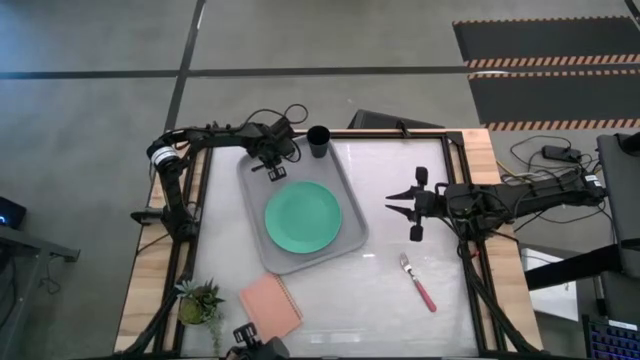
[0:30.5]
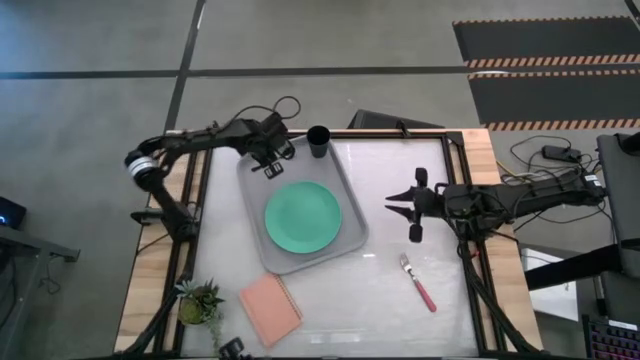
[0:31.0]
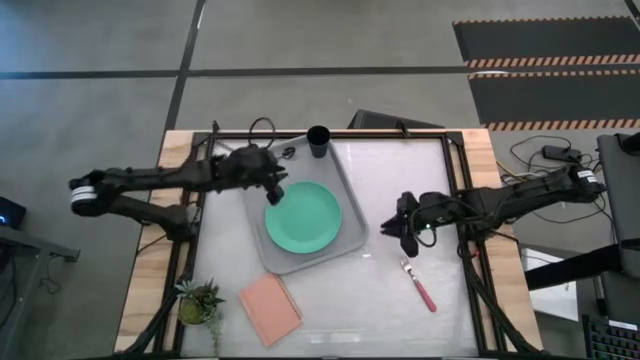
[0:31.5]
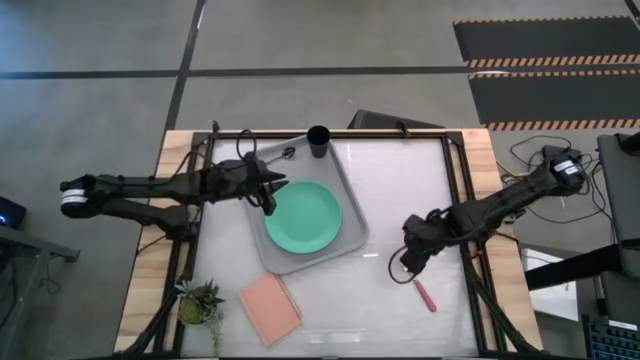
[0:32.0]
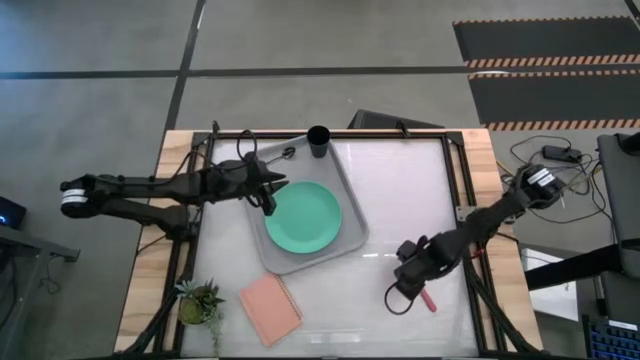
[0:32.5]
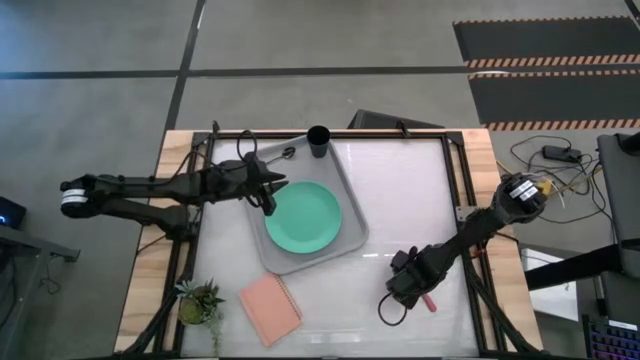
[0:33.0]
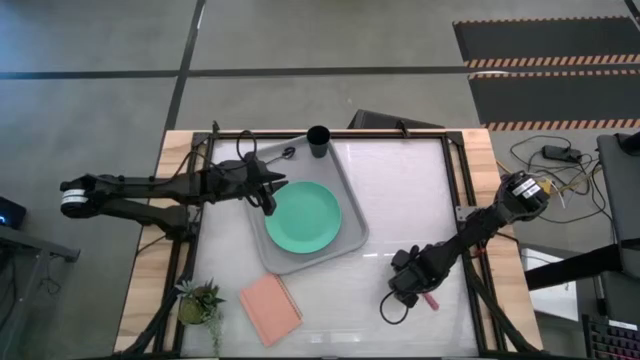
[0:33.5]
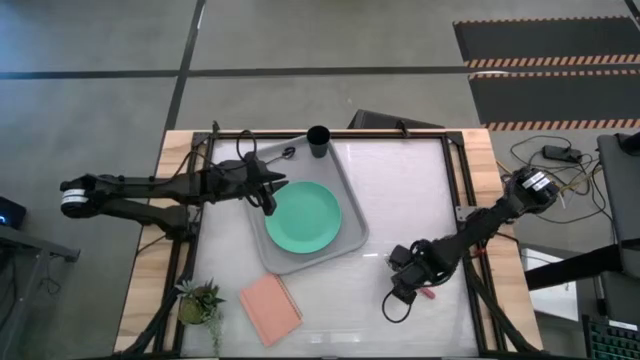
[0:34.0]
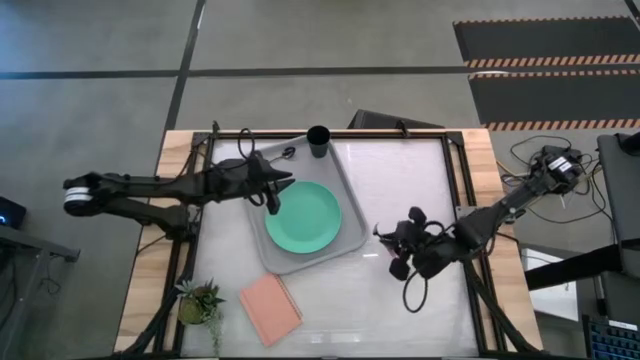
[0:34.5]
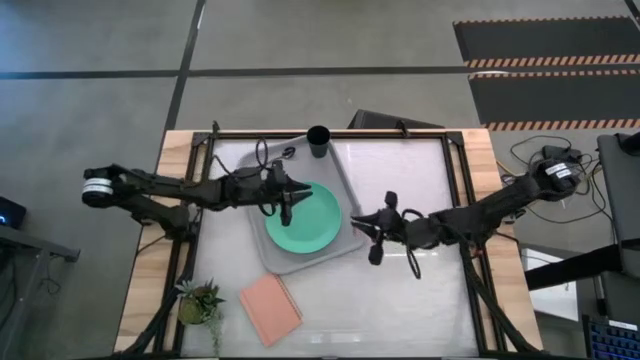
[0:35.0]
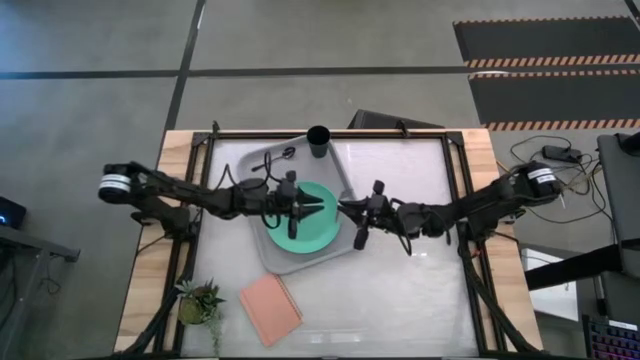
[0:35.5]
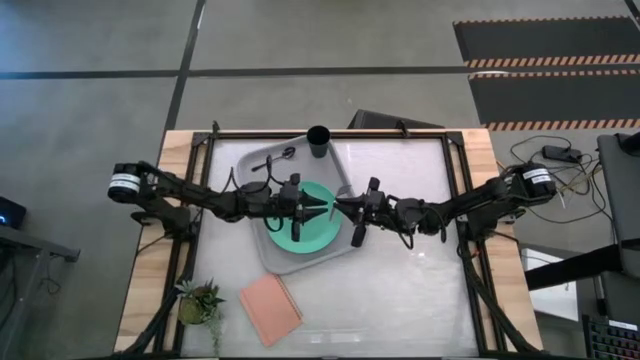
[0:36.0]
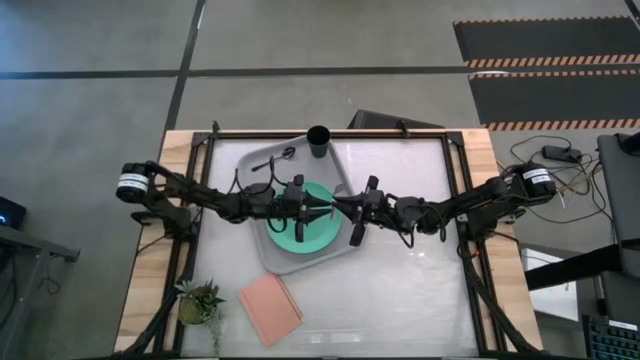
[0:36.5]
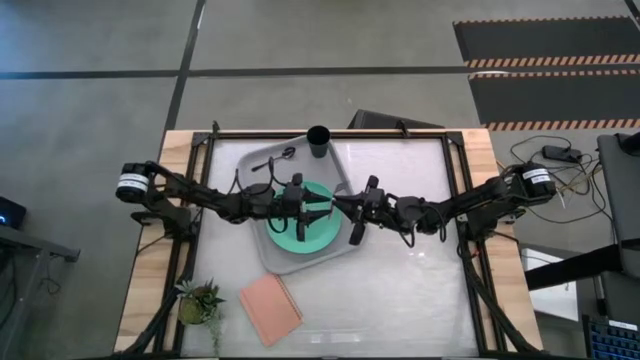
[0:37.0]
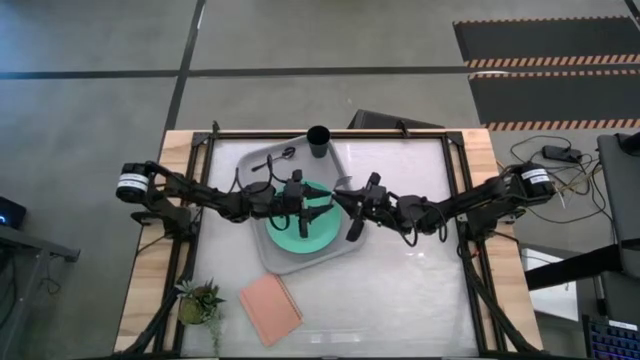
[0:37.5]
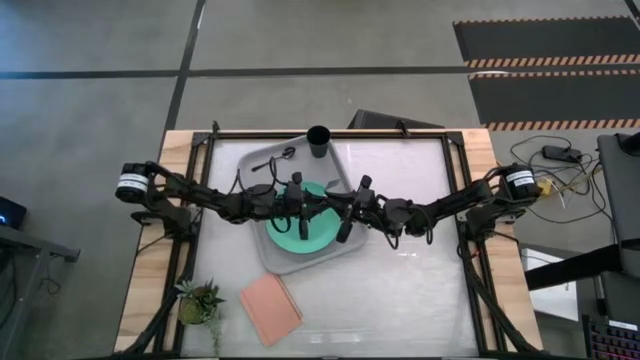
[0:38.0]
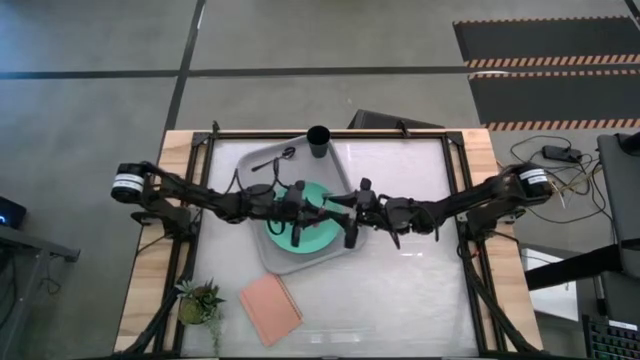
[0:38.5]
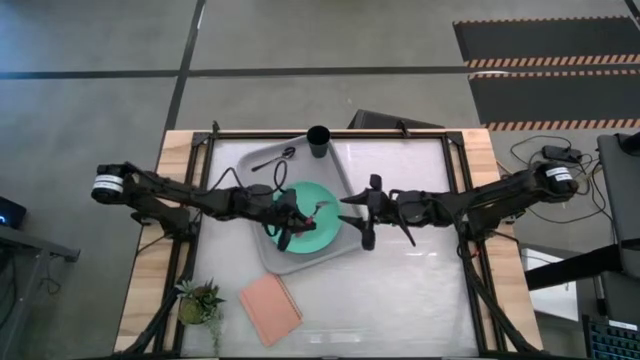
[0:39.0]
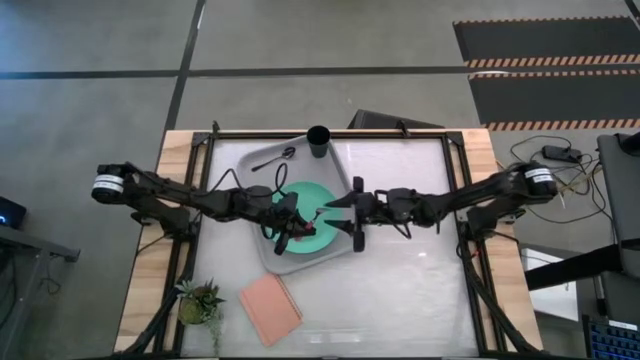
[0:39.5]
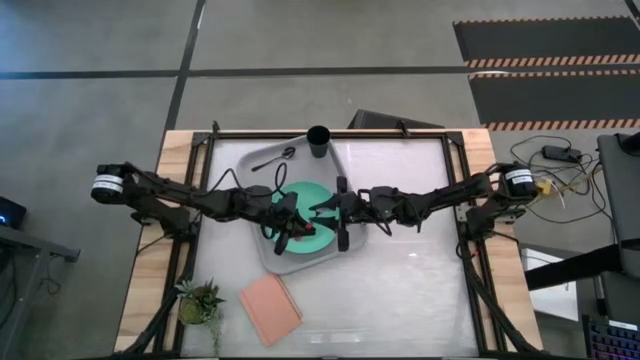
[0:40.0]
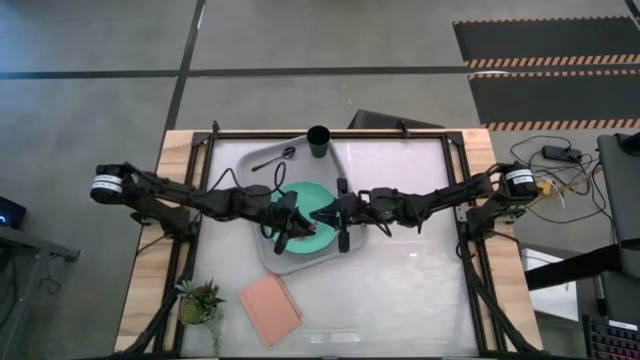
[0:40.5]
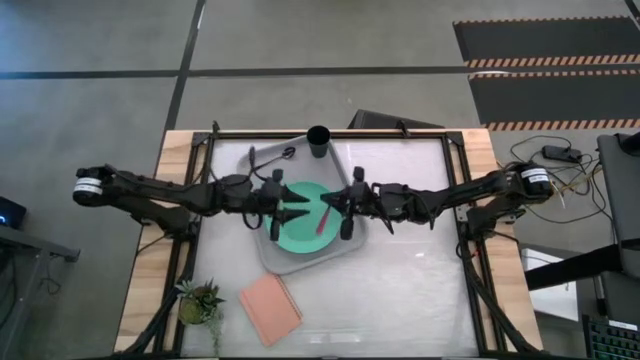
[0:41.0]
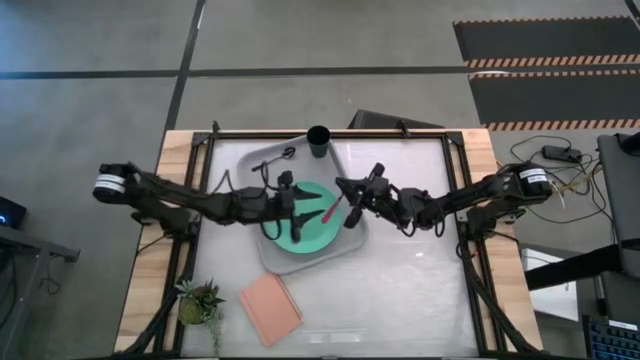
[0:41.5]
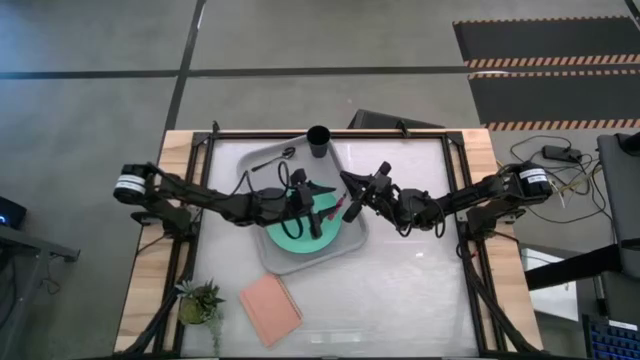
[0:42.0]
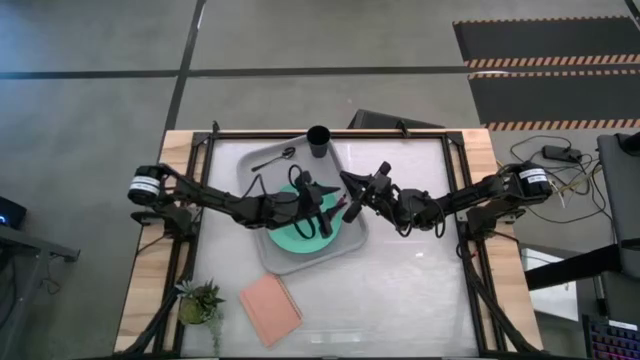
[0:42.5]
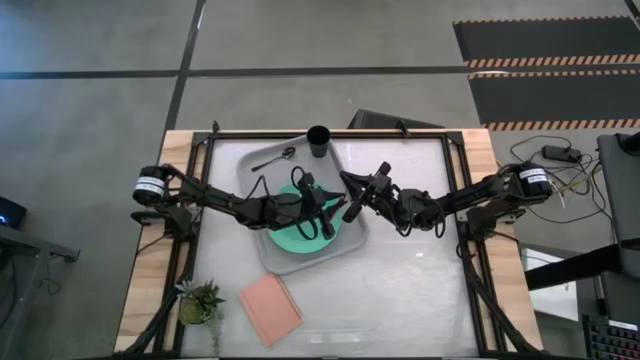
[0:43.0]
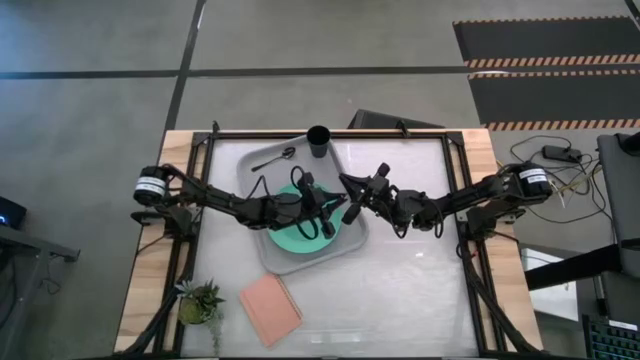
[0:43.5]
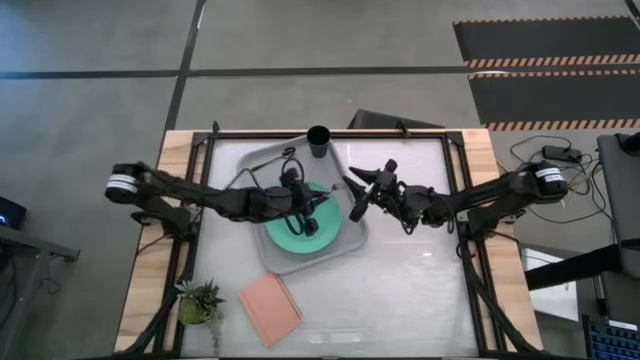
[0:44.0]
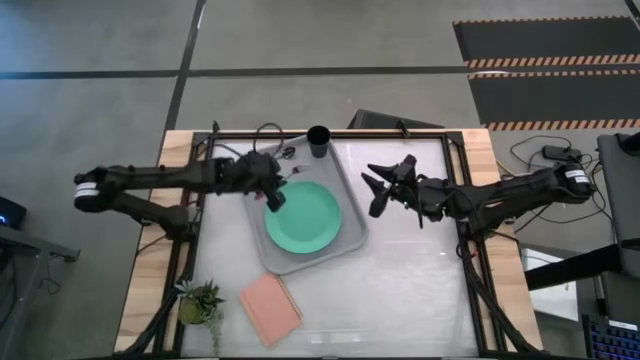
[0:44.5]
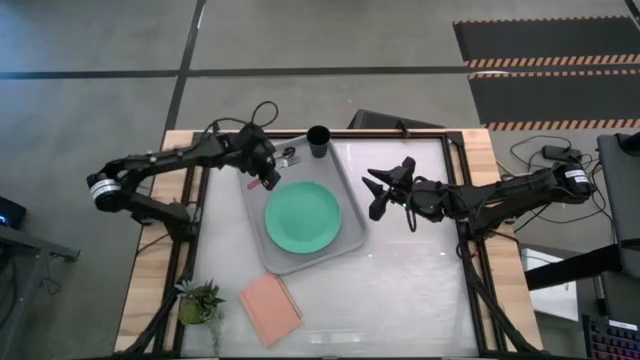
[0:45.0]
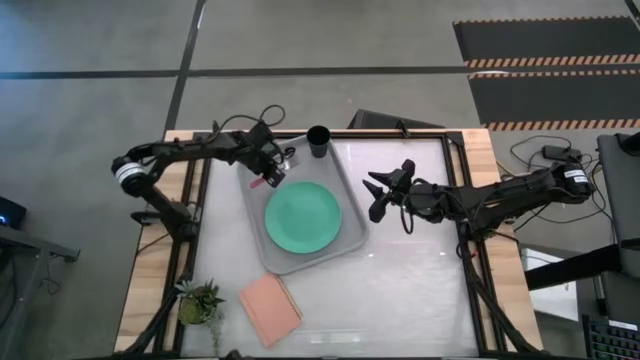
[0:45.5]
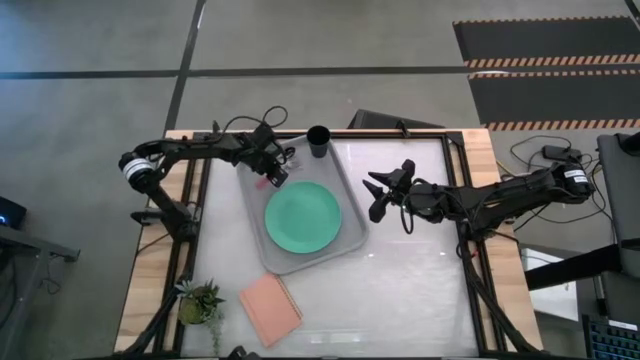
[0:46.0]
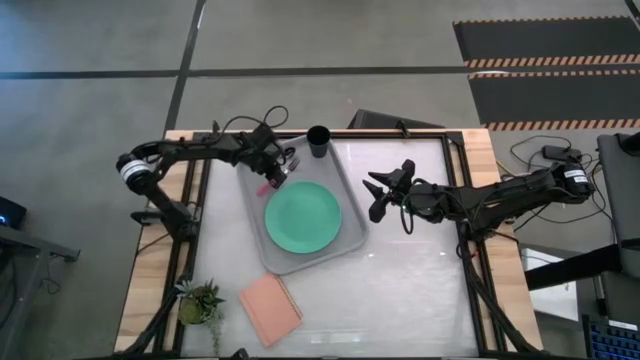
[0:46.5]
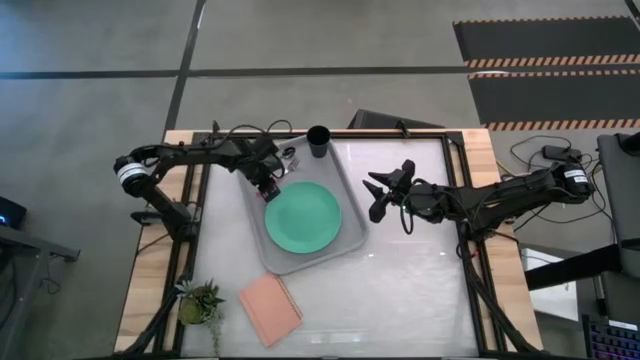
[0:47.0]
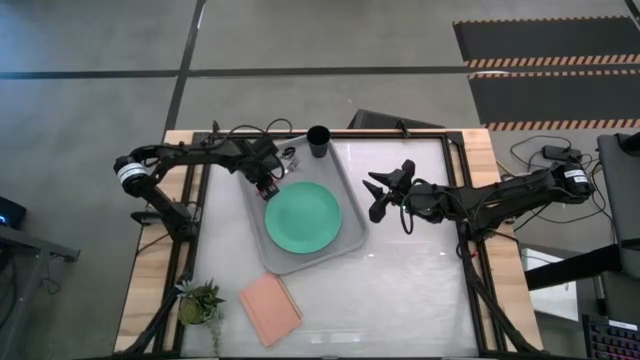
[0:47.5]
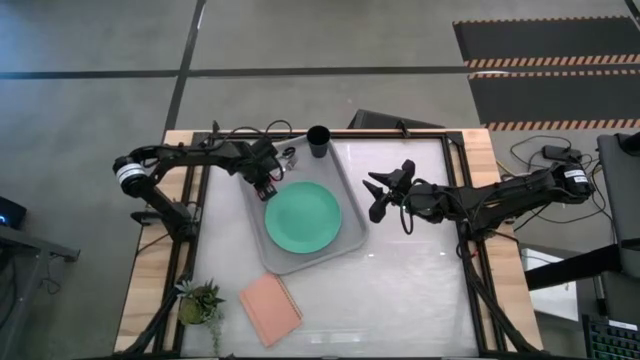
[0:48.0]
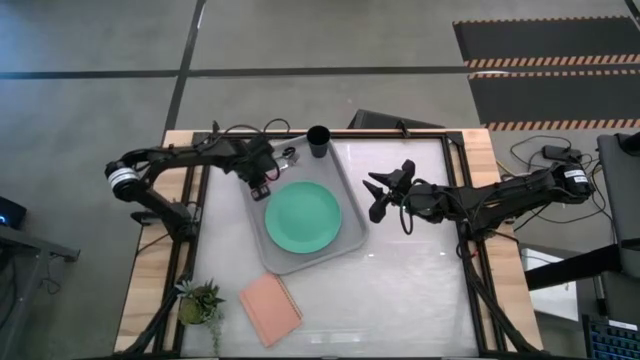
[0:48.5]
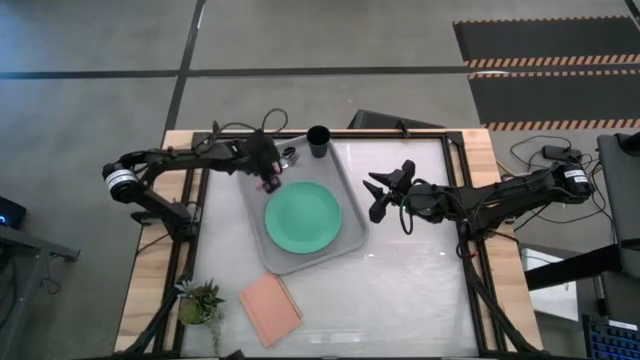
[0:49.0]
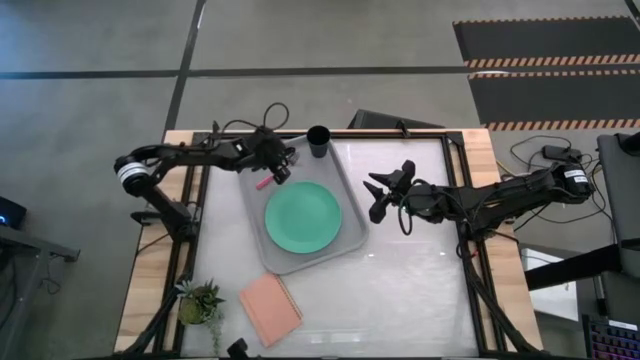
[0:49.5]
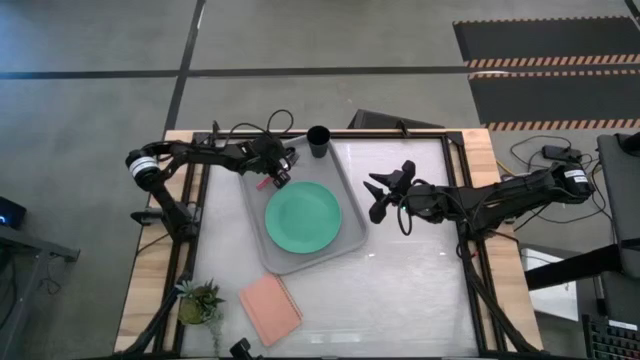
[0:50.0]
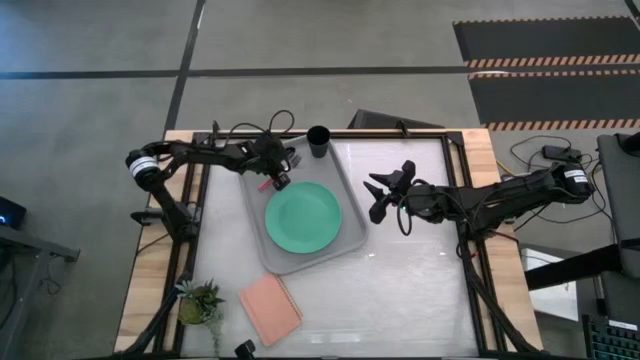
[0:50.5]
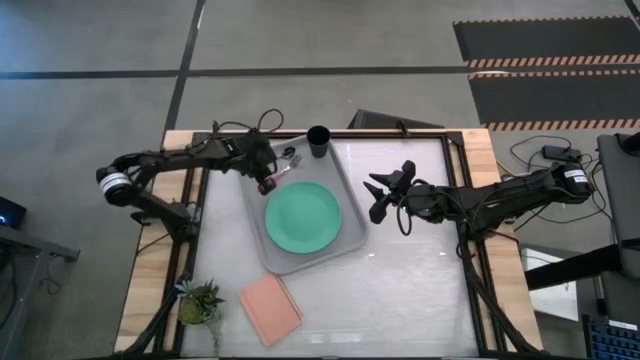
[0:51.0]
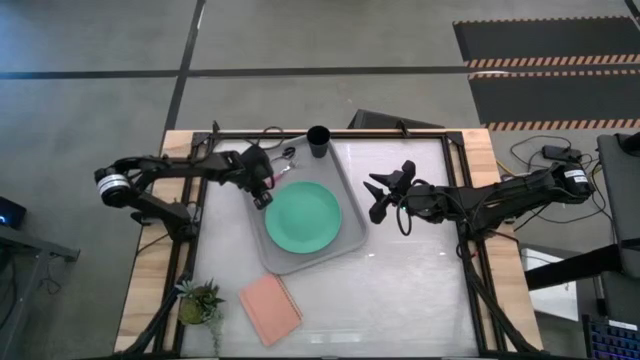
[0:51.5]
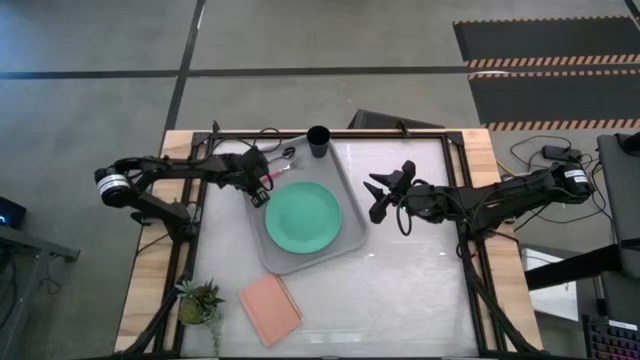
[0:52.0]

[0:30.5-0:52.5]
Task: Pick and place plate/cup/fork/spoon on tray
Put the pink fork between the black spoon and green plate on the gray serving tray
